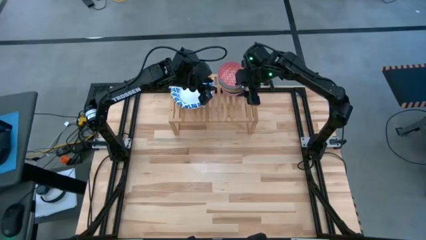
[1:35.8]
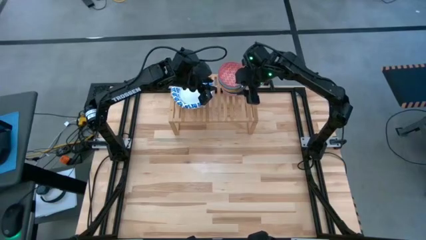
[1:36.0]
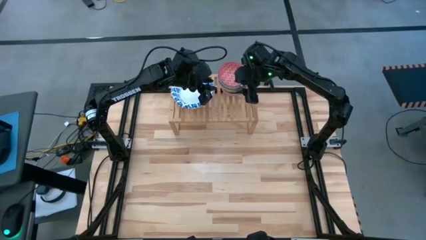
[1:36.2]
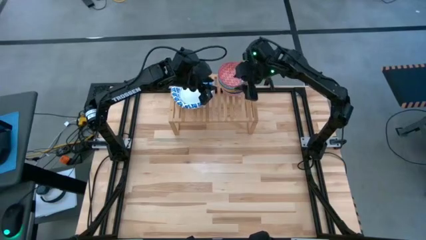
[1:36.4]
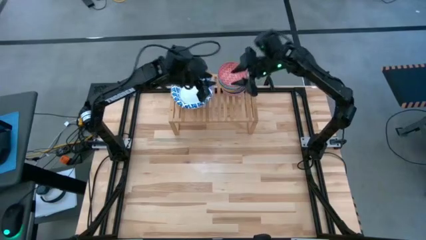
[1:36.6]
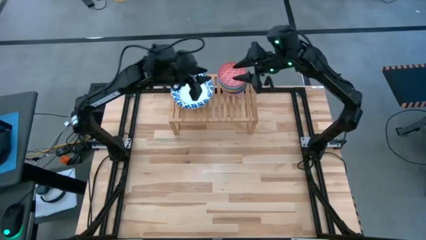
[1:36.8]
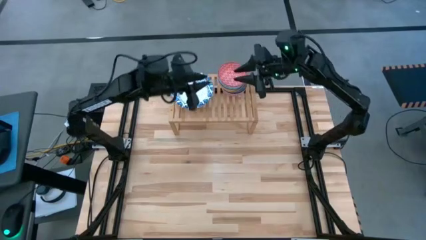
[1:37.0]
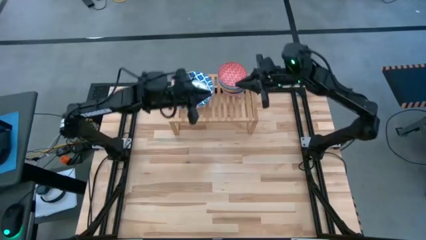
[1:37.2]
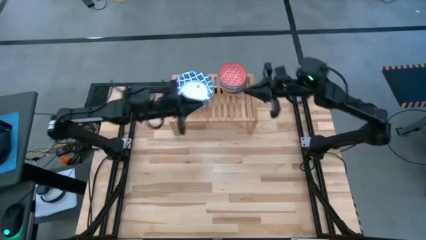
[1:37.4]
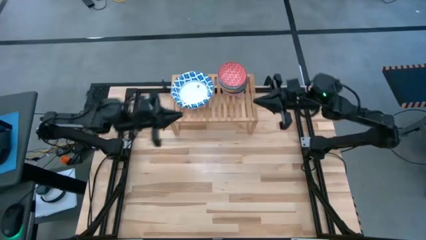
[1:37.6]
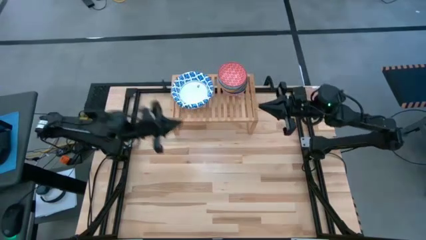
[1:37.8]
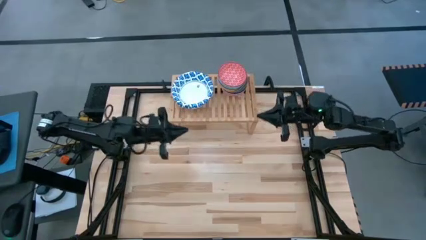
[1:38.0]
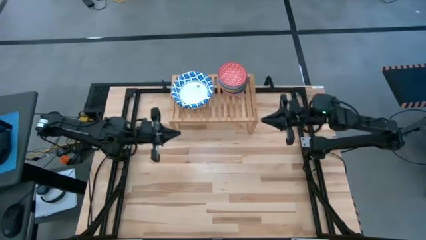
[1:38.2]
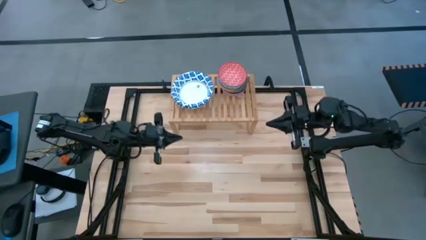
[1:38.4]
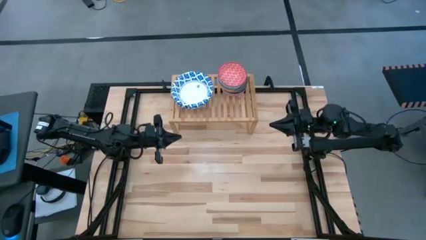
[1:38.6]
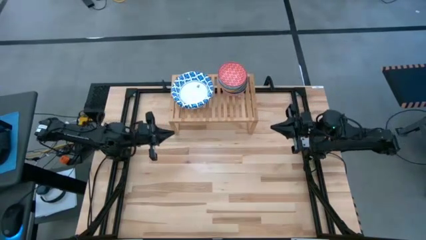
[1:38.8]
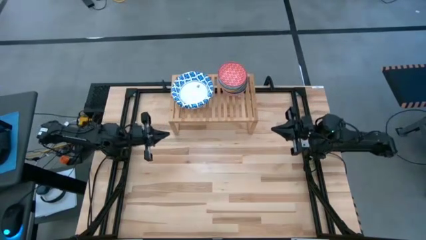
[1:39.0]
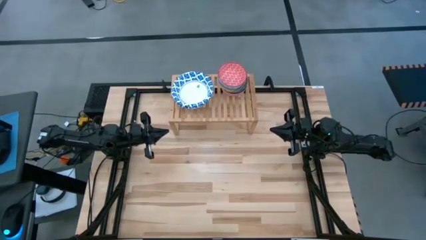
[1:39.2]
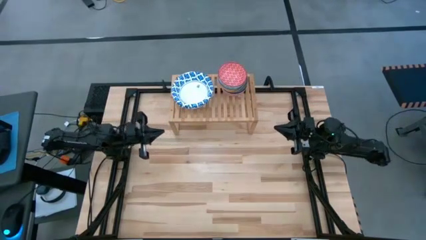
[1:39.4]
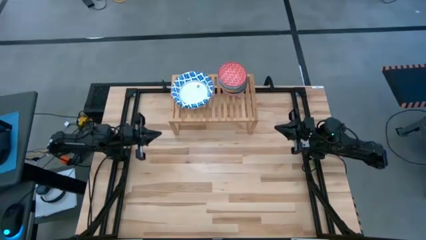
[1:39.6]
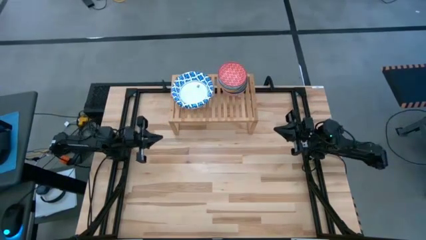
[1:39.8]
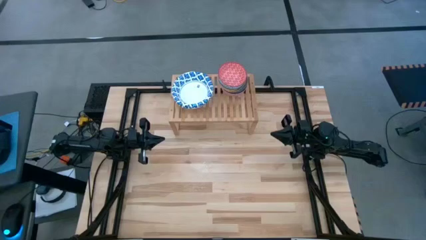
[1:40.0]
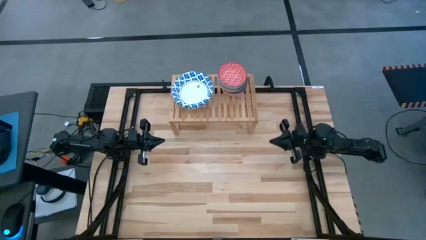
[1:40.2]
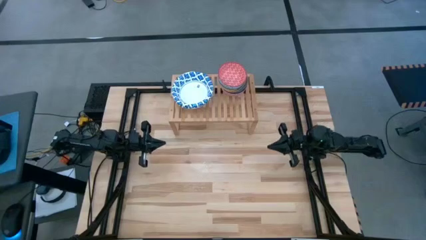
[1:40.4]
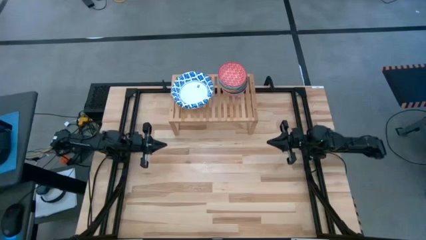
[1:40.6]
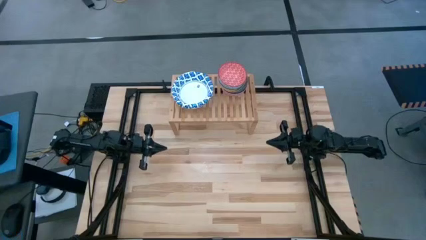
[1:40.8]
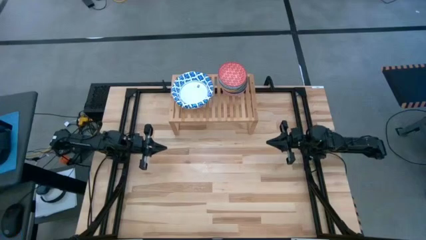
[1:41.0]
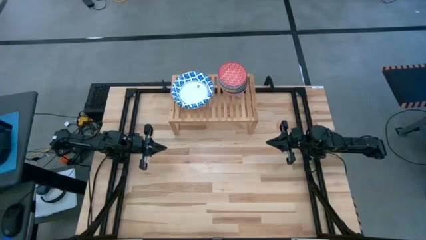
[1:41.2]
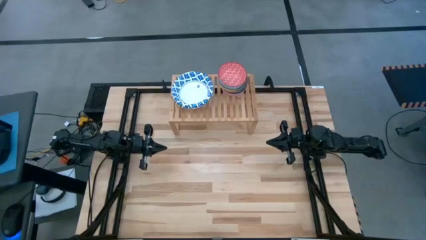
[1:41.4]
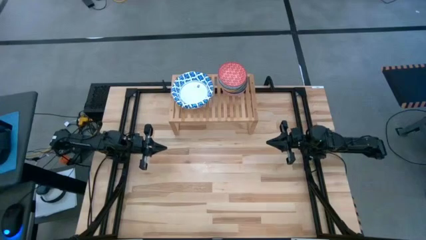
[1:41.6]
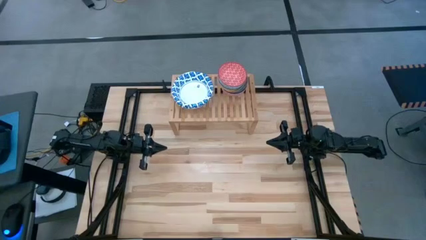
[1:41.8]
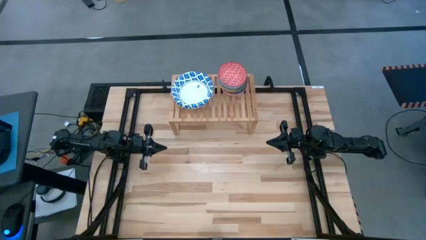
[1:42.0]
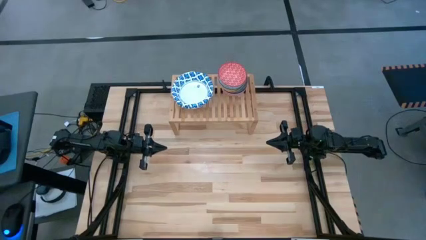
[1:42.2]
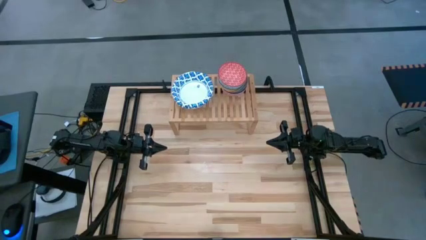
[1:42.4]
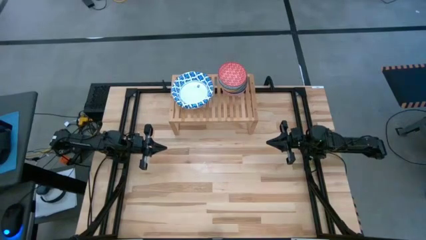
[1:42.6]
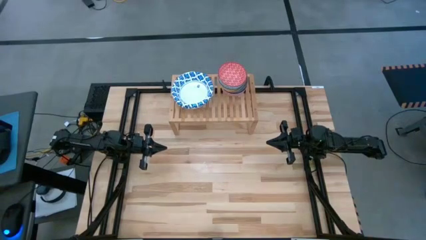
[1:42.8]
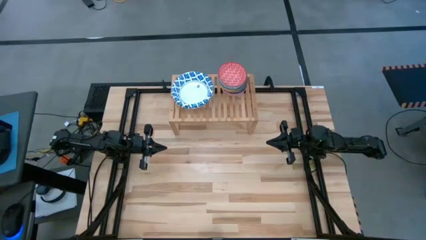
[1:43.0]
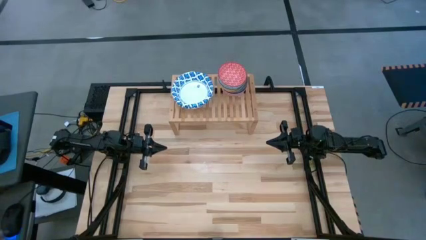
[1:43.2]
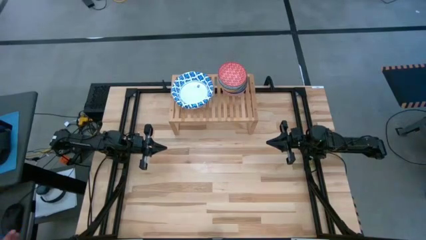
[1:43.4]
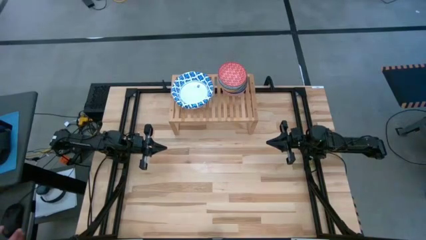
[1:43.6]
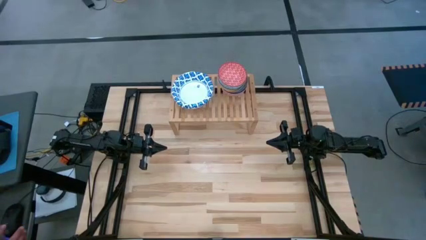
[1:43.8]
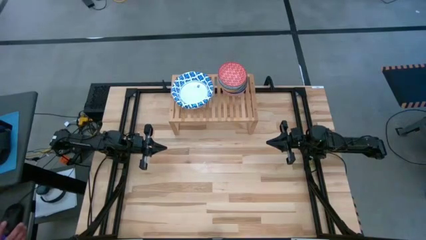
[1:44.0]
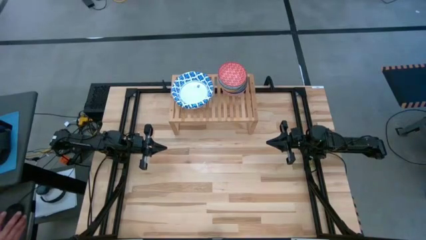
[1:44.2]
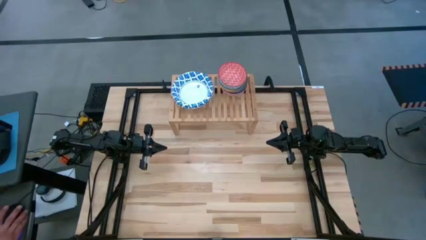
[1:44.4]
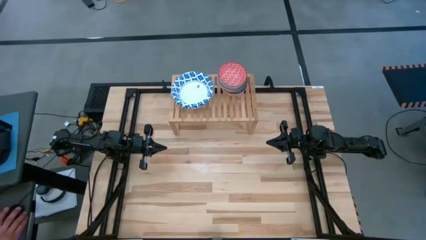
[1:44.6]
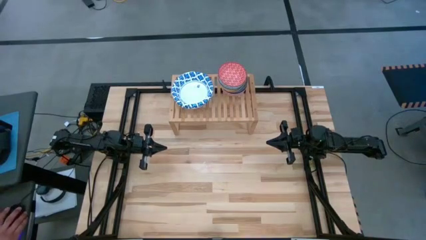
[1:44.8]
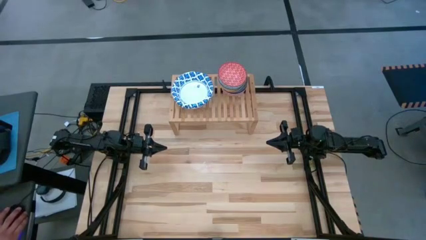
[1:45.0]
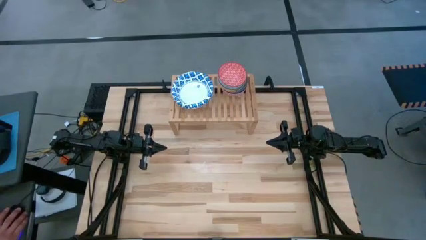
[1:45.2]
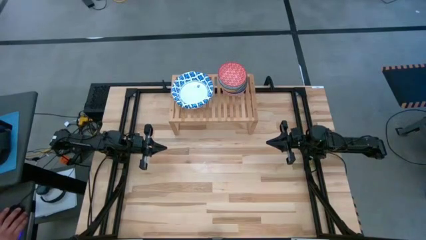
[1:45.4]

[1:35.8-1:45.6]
Task: Place and stack bowls onto a shelf
Return to Home Position

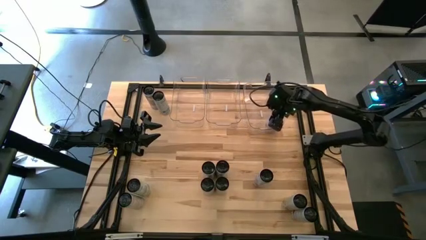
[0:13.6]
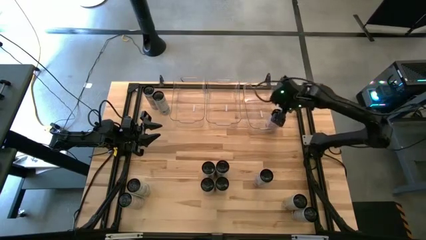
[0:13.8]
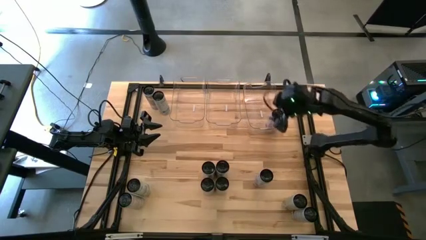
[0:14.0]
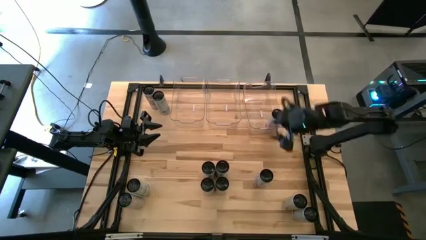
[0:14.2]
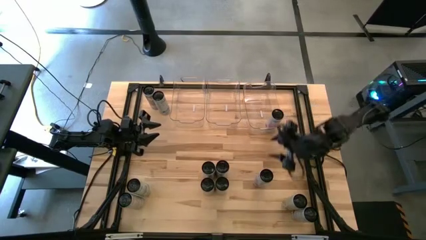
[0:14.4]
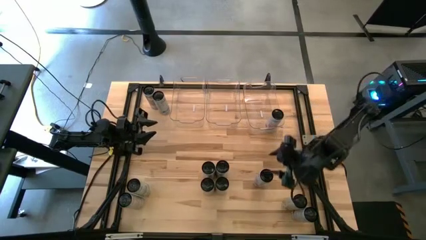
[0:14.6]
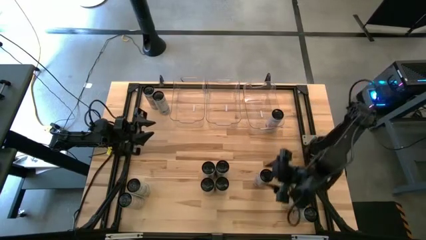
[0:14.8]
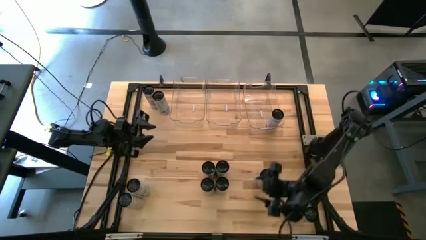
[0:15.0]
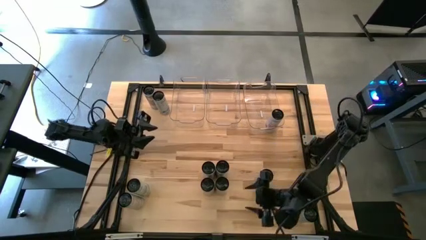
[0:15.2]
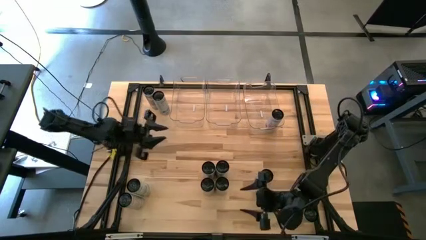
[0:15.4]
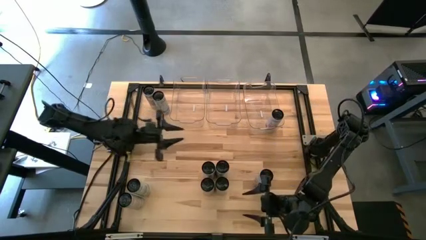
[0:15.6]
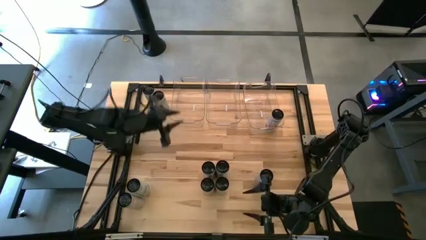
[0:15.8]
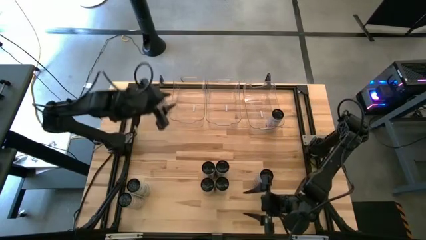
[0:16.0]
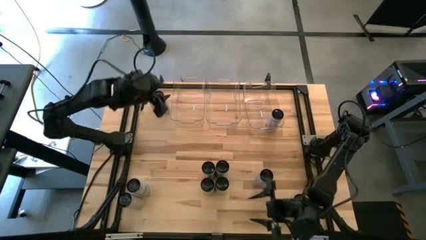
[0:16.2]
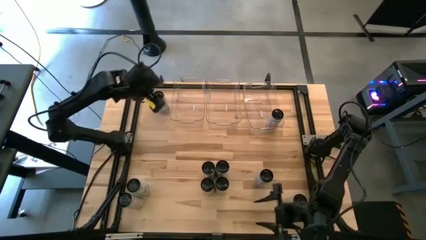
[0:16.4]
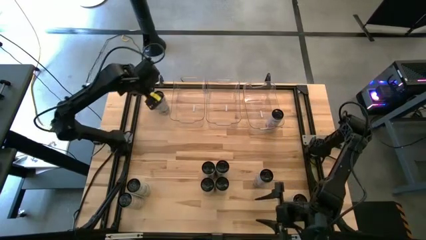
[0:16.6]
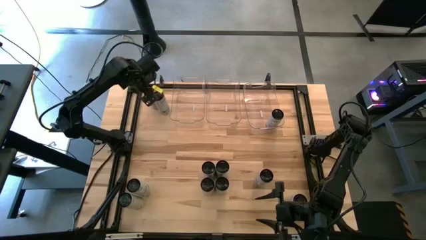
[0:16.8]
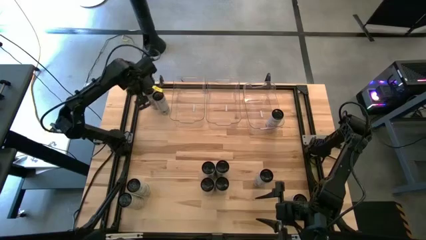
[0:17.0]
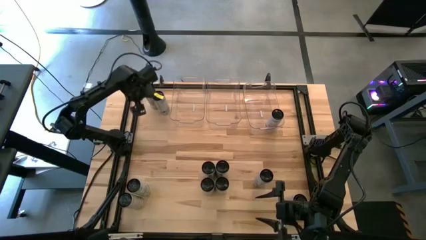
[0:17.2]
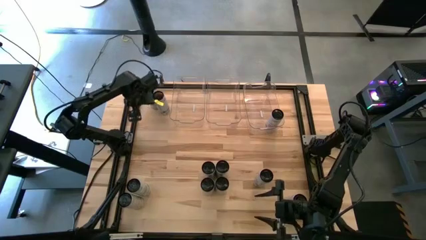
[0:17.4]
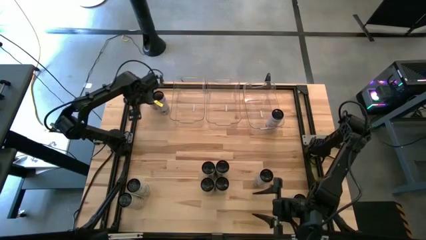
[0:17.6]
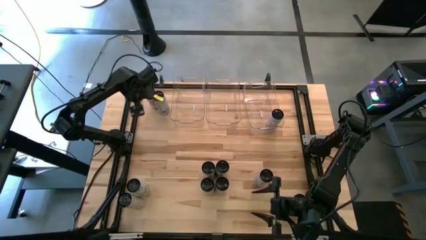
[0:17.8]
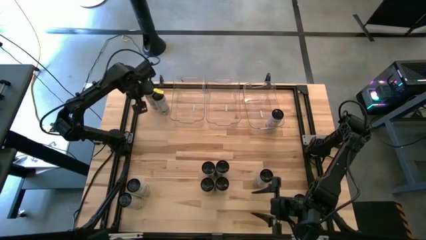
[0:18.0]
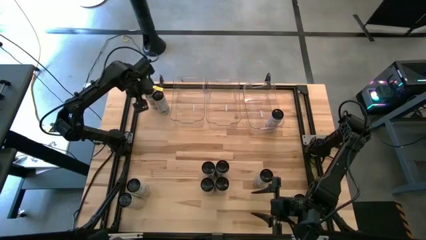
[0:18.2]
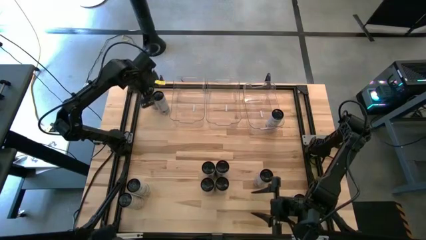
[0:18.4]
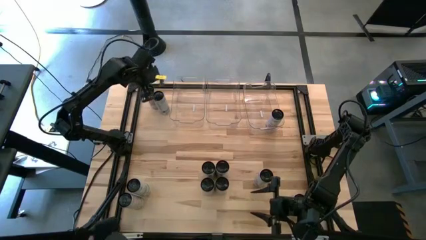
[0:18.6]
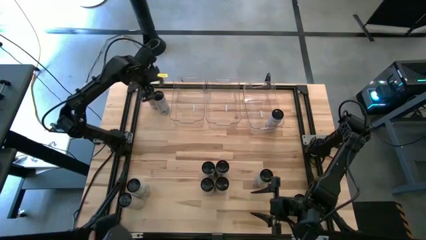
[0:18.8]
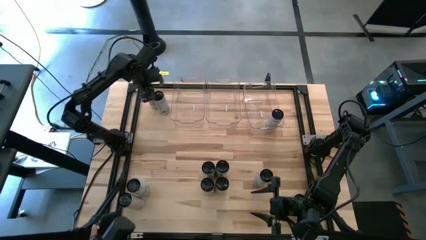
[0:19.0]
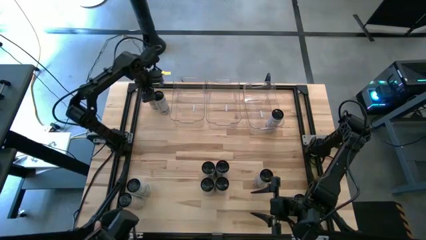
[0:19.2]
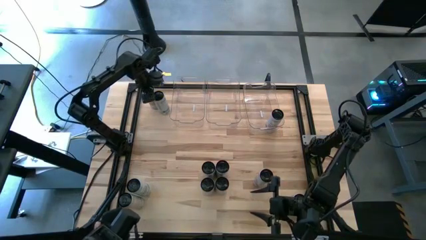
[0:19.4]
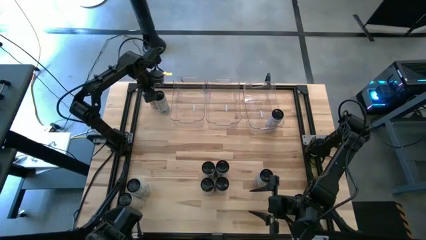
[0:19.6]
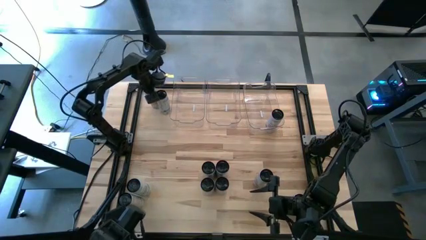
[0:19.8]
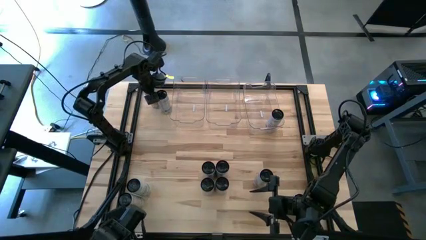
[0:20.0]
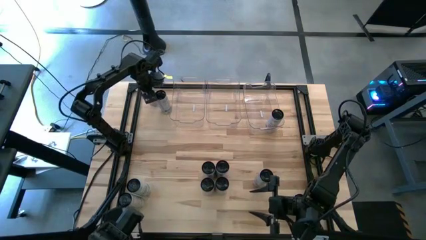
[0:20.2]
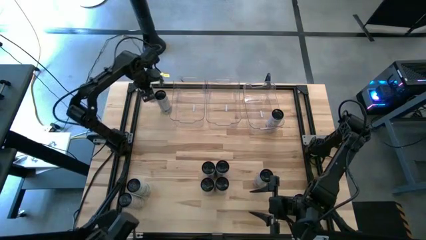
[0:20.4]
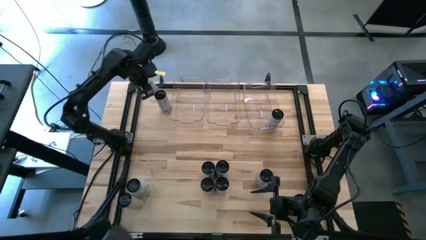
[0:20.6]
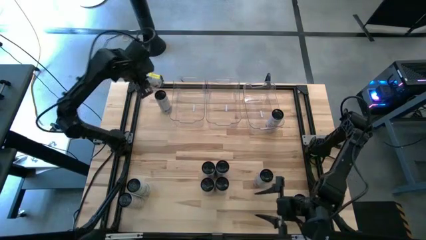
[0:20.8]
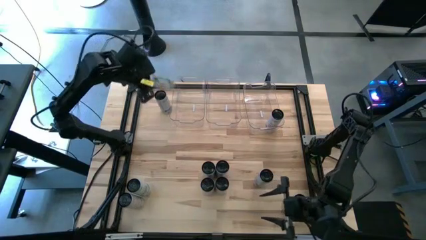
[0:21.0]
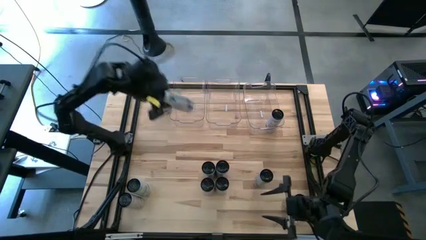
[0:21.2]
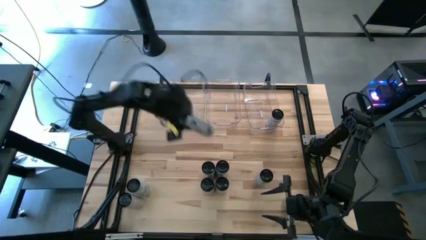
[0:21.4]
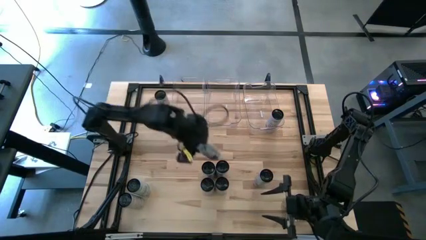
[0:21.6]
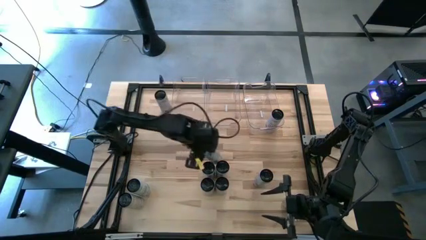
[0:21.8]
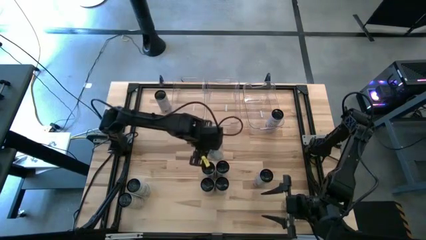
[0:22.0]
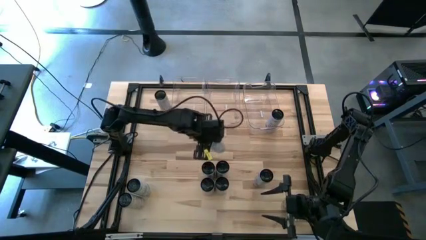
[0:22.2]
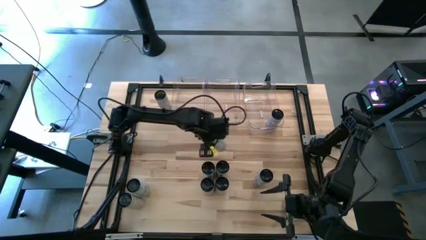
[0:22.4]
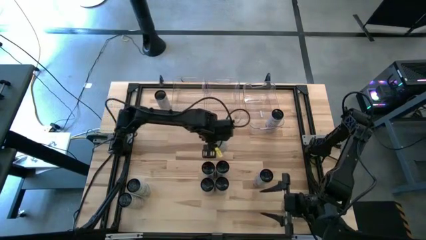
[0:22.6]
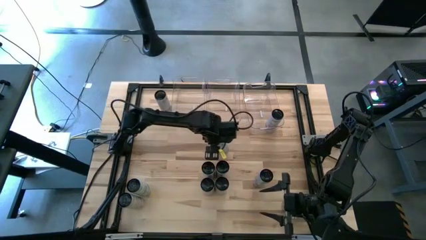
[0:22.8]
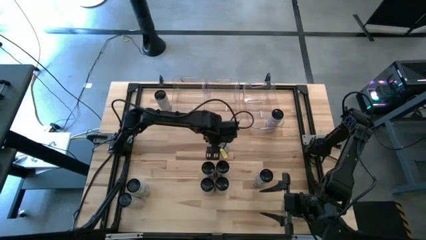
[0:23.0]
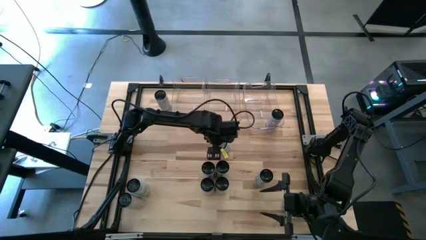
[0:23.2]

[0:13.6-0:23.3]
Task: Sort soda cans
Put the top white-pink soda can into the right transparent bin
